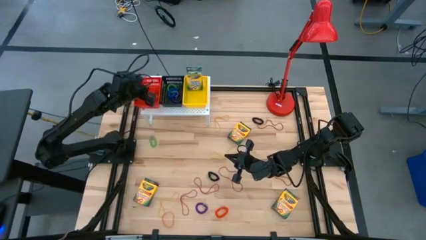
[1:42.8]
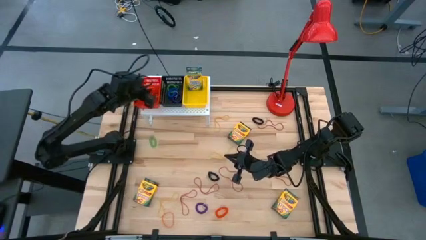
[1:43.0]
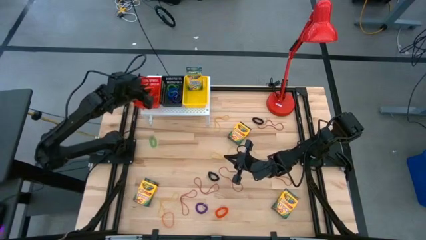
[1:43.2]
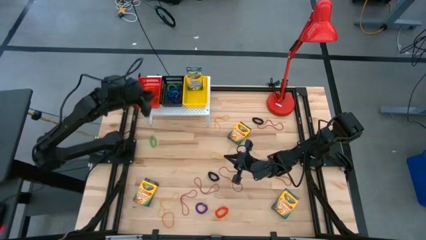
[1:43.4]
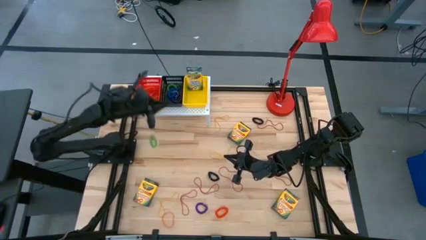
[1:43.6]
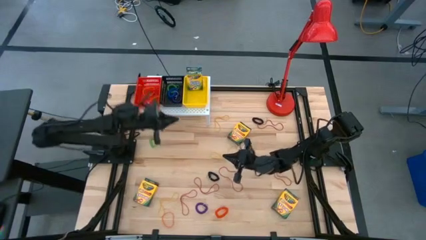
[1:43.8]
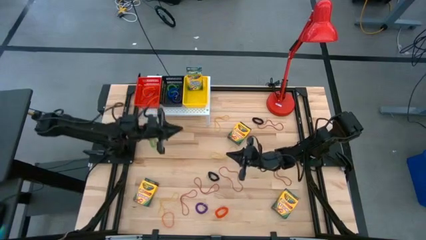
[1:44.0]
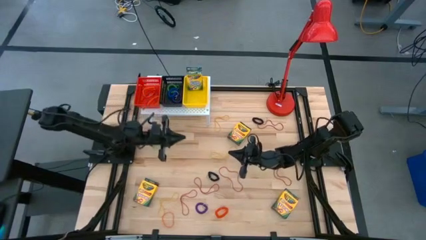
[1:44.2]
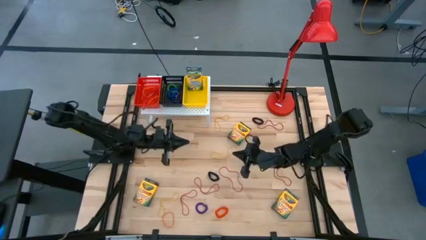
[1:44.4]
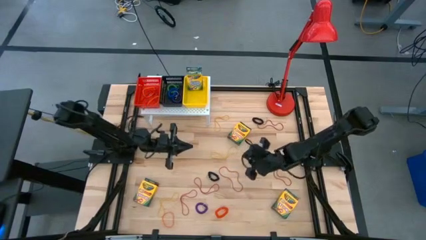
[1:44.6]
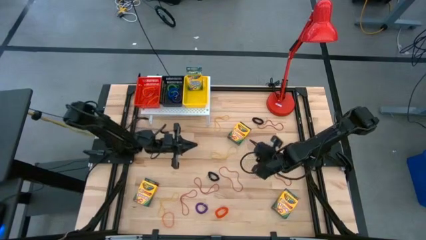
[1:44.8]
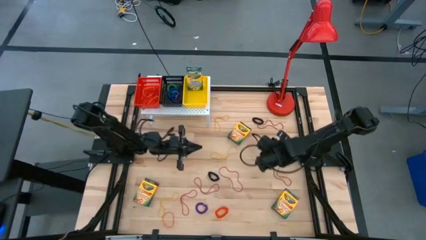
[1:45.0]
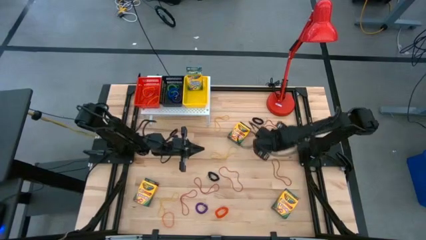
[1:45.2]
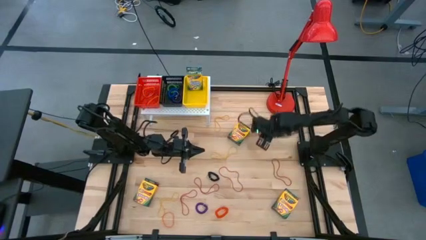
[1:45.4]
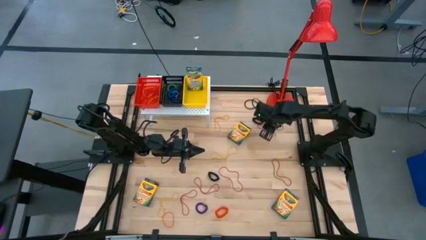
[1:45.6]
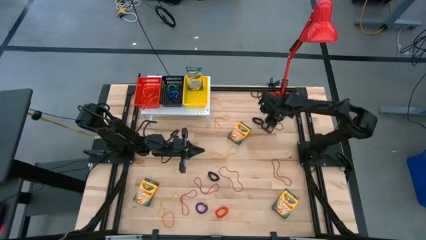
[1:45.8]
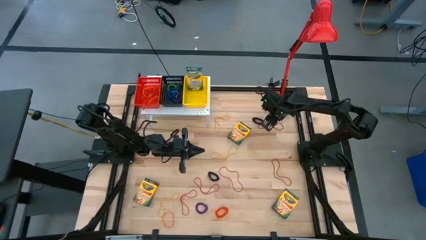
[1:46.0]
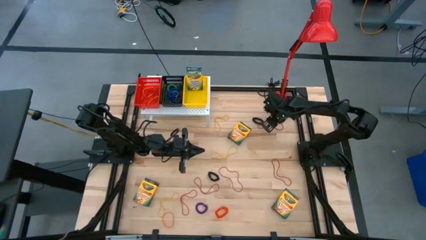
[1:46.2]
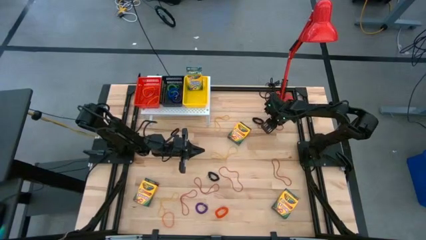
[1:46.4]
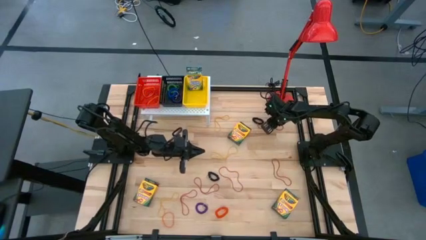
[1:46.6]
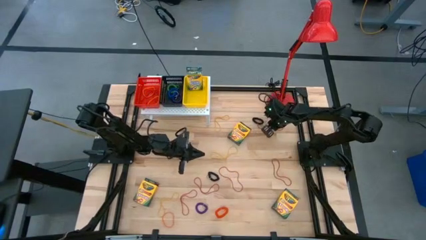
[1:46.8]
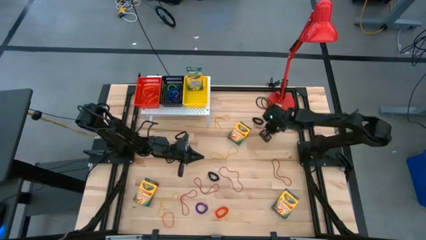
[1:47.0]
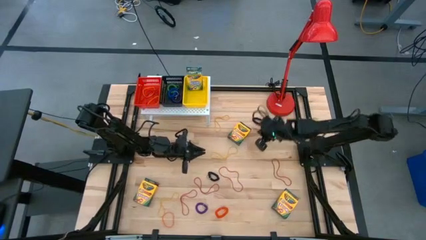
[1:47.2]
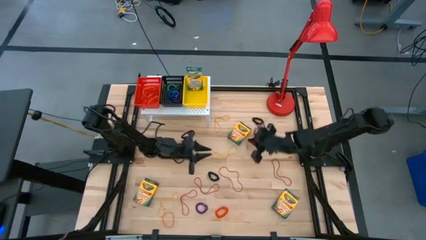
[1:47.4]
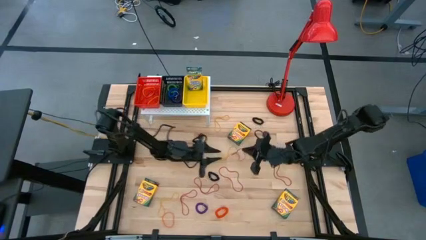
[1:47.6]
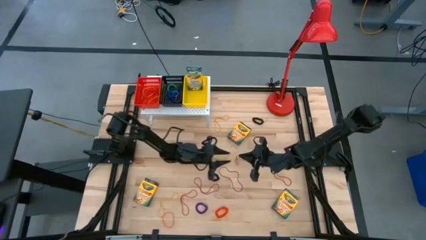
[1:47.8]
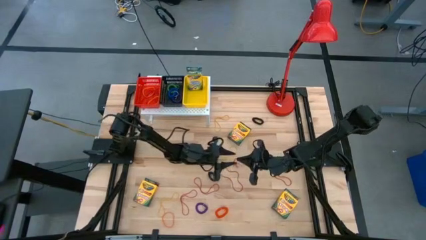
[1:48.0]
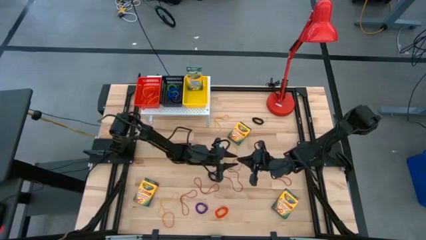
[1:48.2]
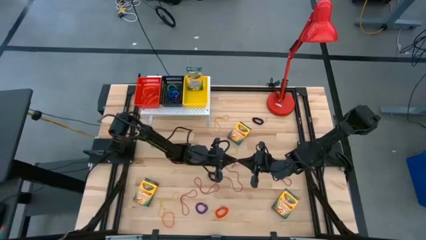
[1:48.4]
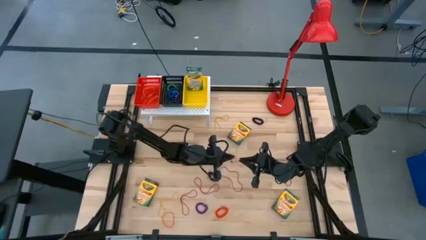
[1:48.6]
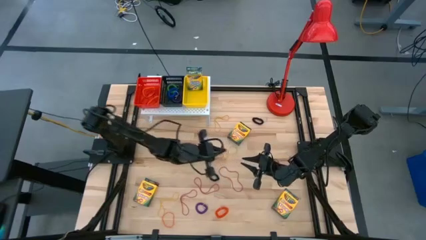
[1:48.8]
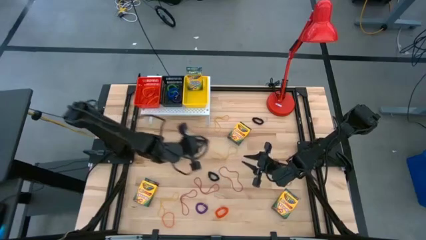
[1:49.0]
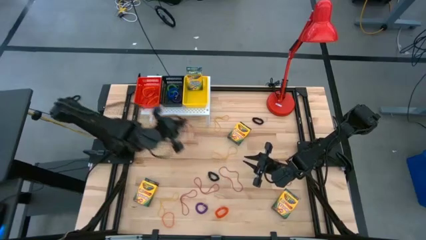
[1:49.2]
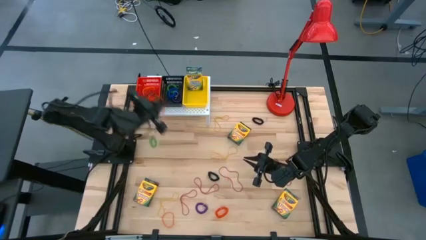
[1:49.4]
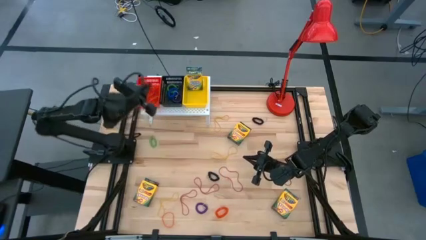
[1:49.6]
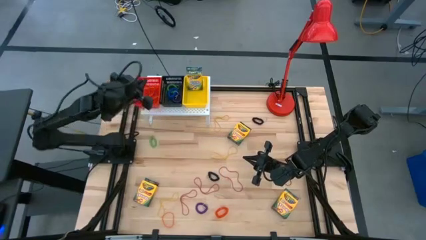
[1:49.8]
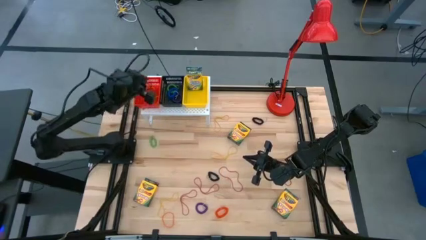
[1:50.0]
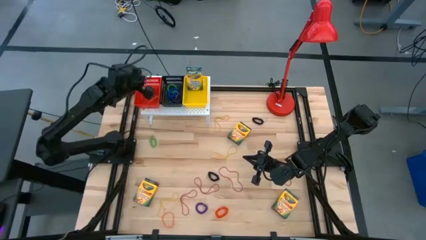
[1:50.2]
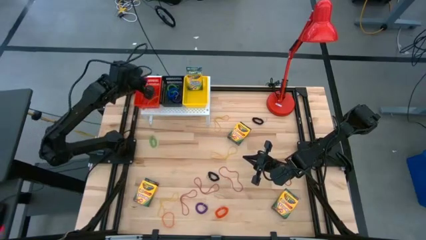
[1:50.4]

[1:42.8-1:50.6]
Task: Pick & Place Office Desk Supplies
Put the red rubber band into the red bin on the shelf

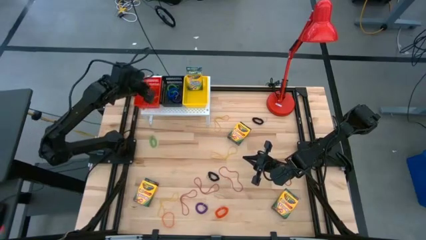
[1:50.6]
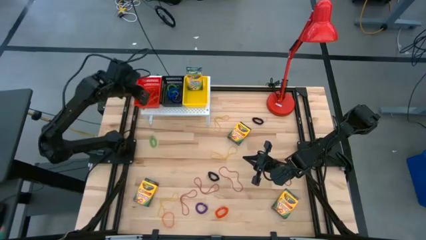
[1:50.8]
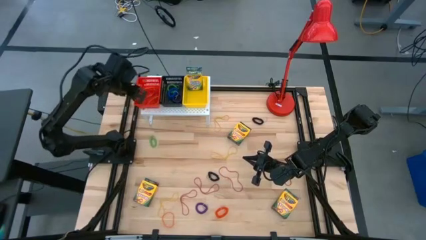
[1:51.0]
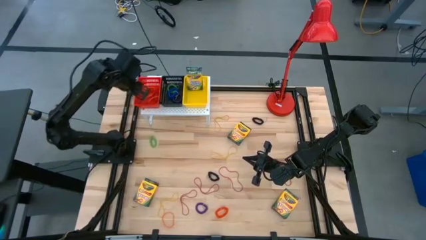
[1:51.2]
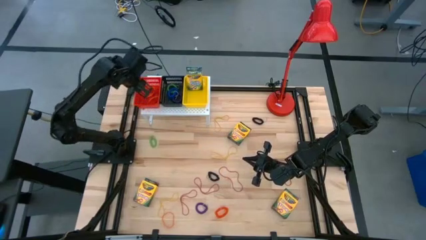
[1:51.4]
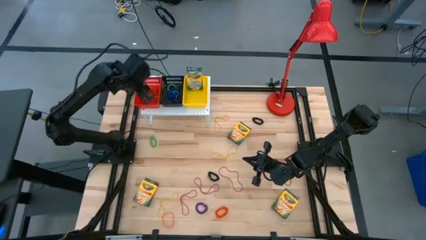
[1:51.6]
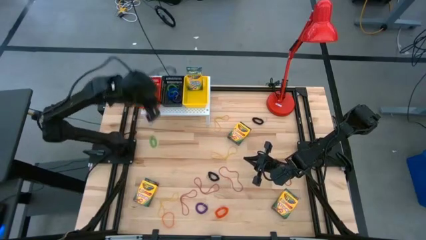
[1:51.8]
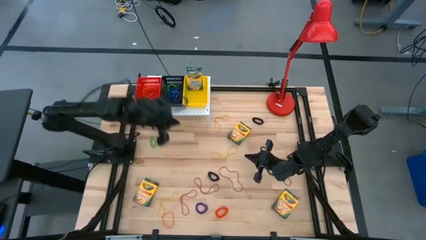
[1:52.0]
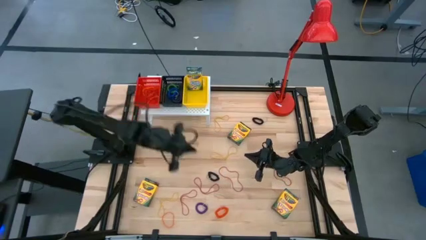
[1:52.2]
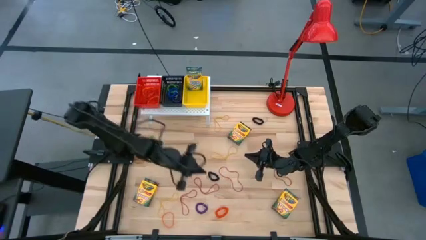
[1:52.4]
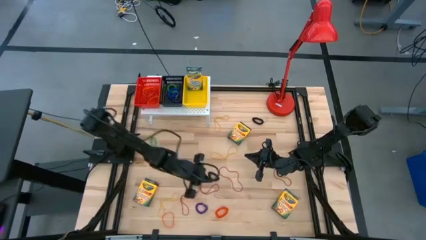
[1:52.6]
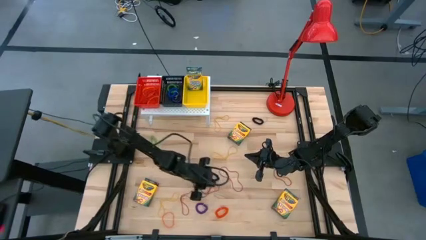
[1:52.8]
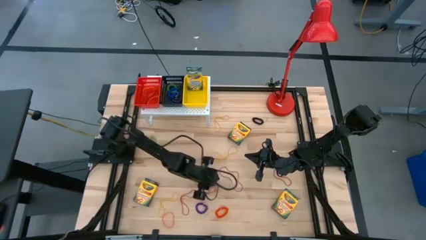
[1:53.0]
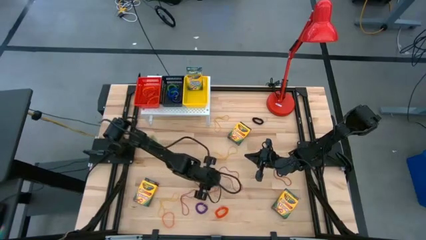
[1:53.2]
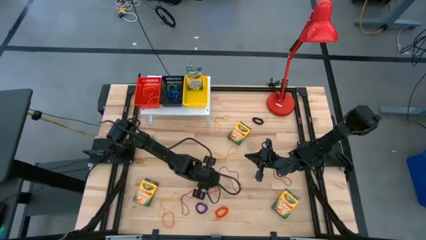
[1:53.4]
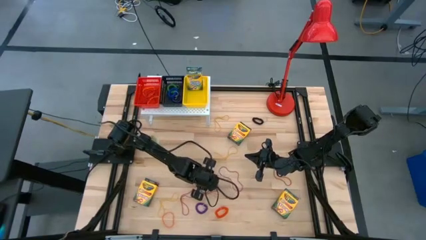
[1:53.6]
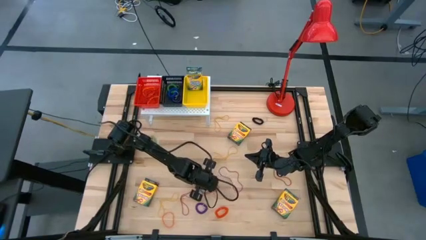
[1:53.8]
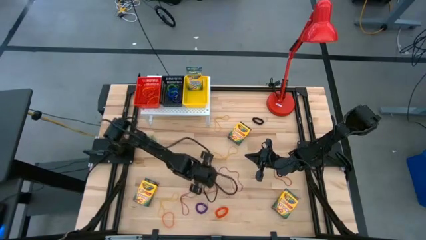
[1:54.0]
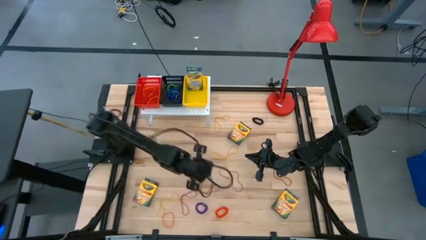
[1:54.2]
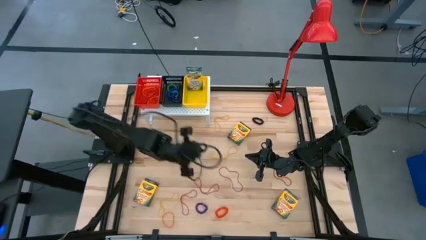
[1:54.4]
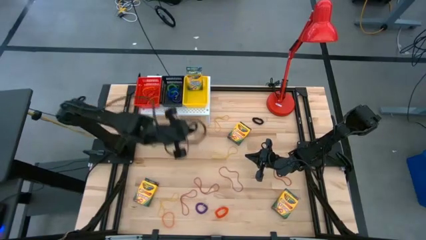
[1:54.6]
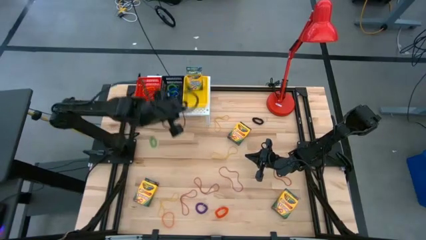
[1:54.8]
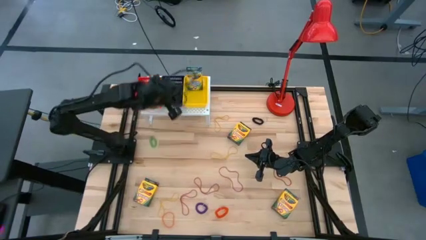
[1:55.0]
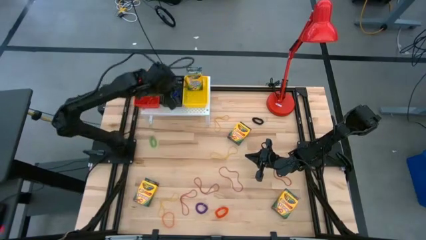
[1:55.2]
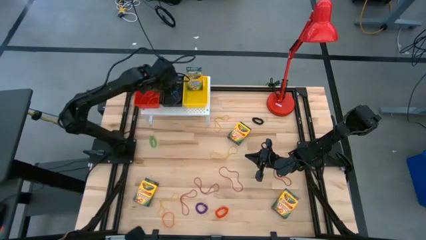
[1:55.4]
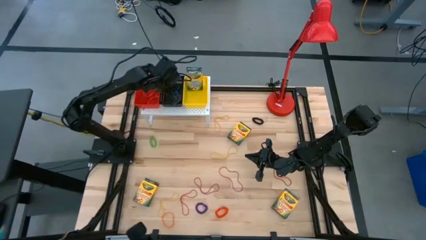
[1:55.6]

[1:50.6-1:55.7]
Put the black spring keychain into the black bin on the shelf

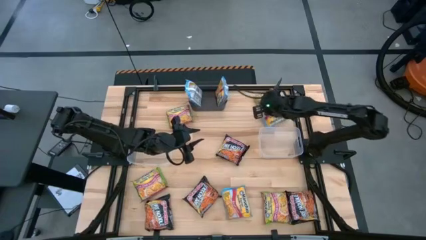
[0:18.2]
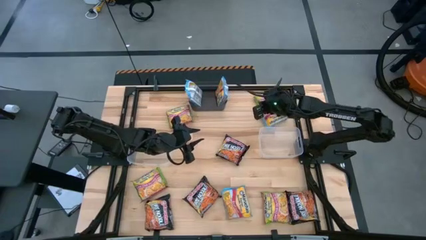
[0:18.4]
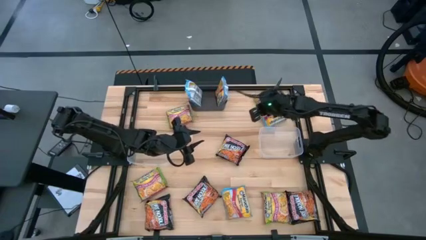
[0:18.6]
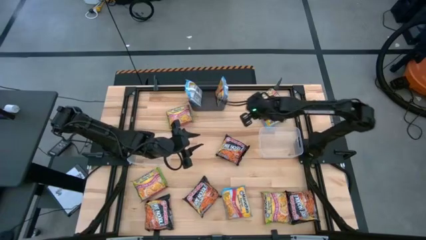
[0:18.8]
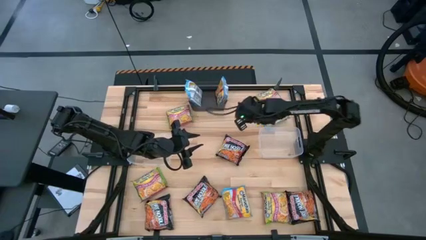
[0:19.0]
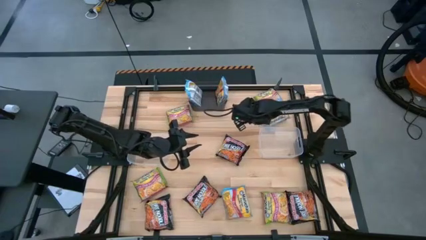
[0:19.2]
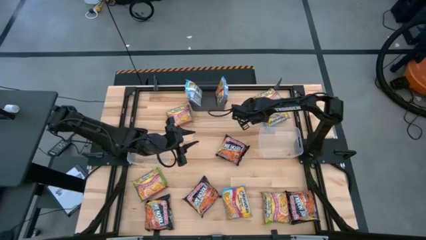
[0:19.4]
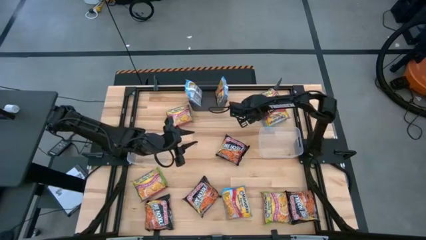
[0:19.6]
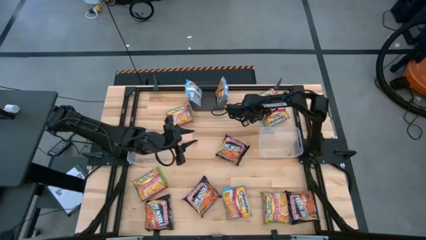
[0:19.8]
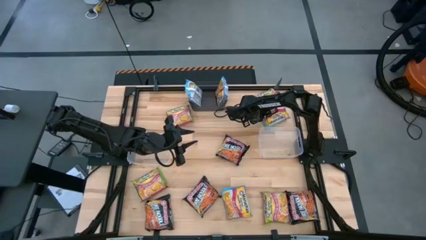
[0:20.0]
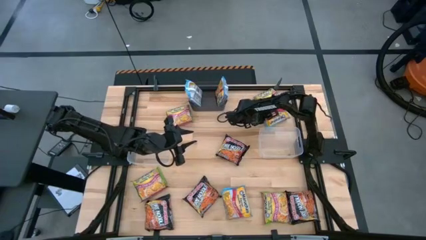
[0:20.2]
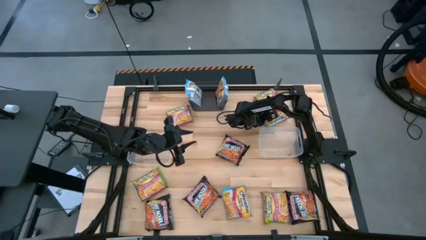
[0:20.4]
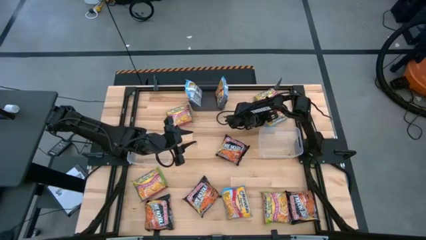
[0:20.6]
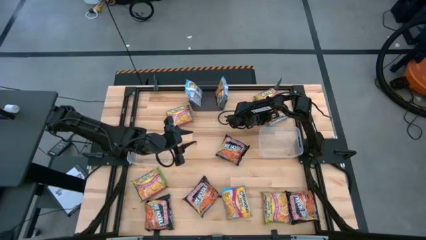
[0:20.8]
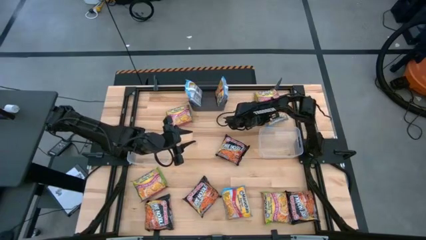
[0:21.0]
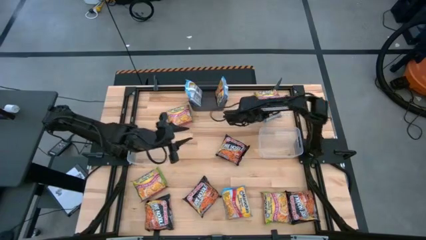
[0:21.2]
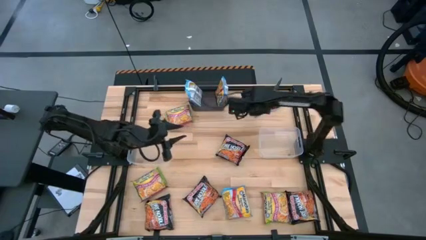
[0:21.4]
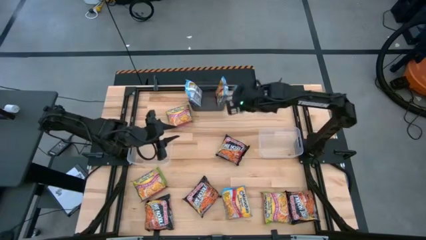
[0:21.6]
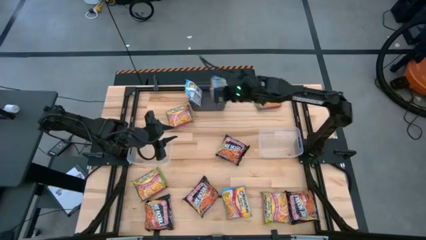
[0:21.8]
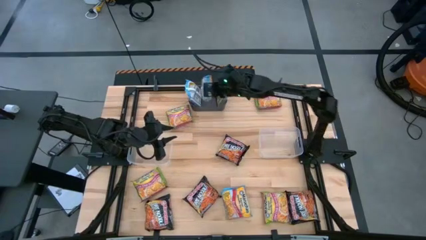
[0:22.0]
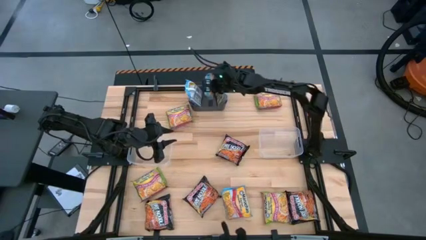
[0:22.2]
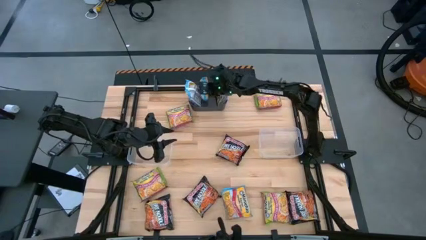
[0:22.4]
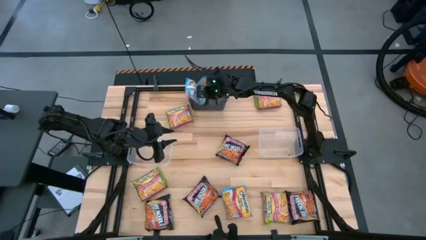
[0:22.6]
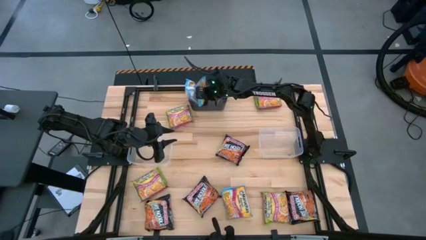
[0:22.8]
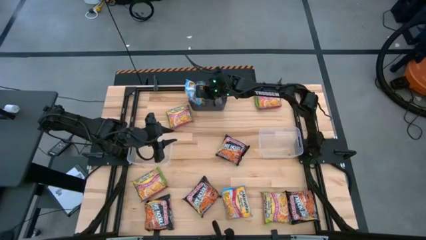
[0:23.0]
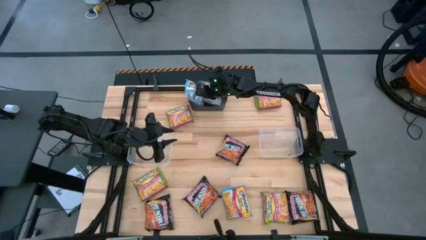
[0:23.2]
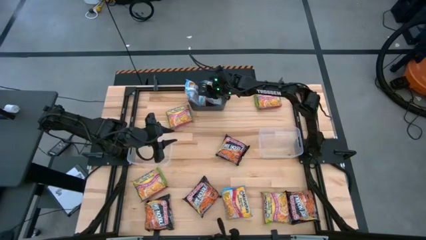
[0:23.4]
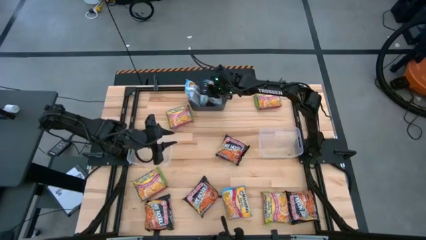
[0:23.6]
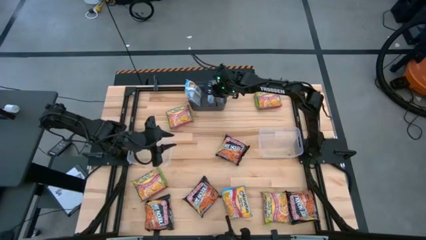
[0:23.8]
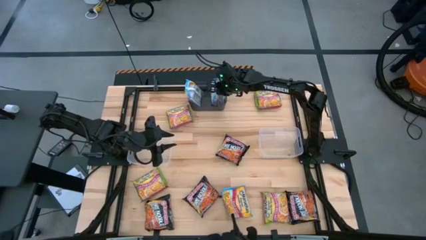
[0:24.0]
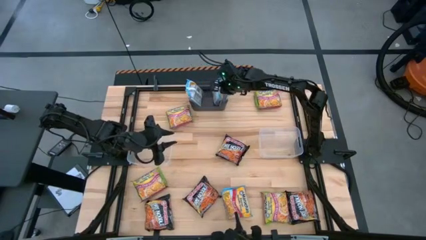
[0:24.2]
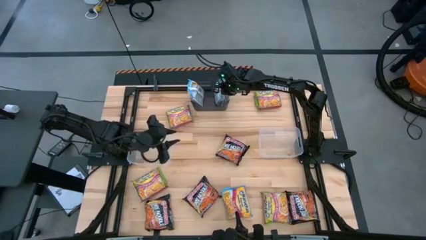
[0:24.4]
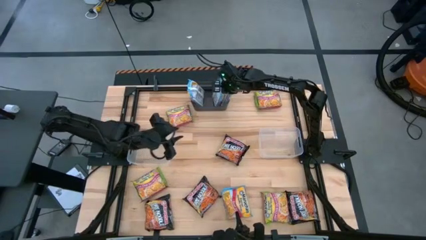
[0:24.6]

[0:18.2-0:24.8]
Task: Sort Maruchan noodles
Put the blue noodle pack into the black bin
